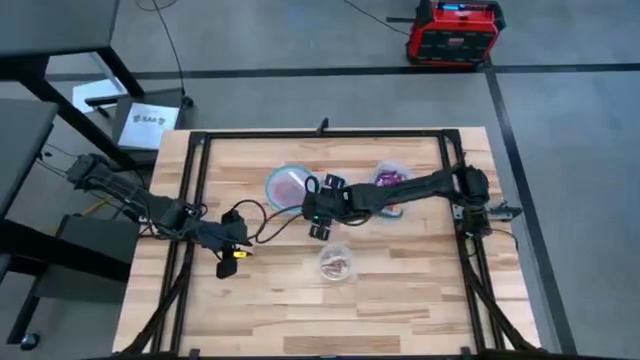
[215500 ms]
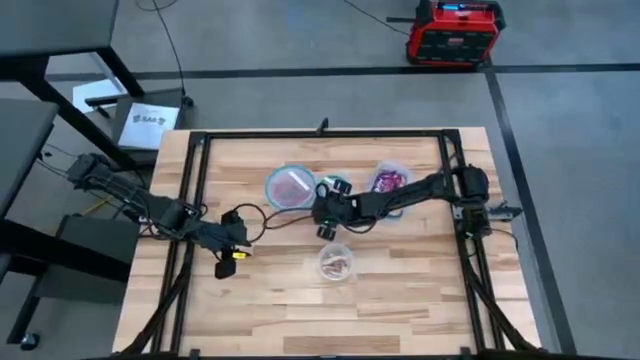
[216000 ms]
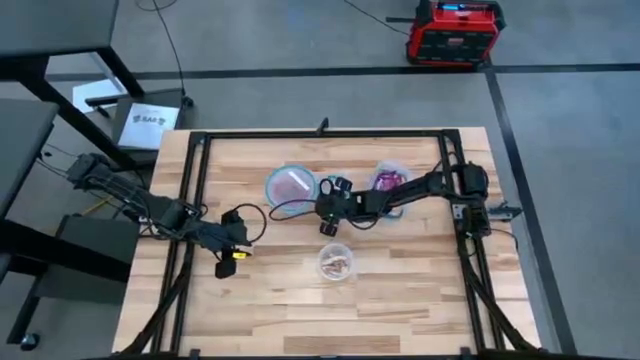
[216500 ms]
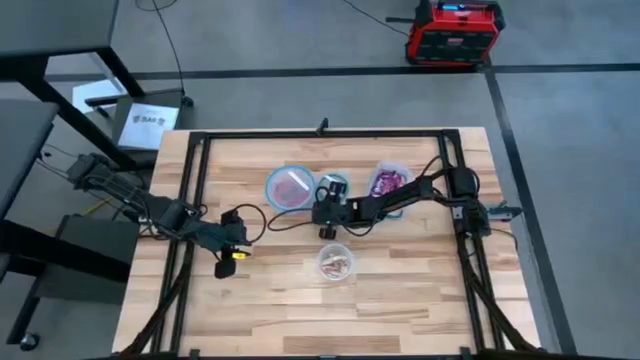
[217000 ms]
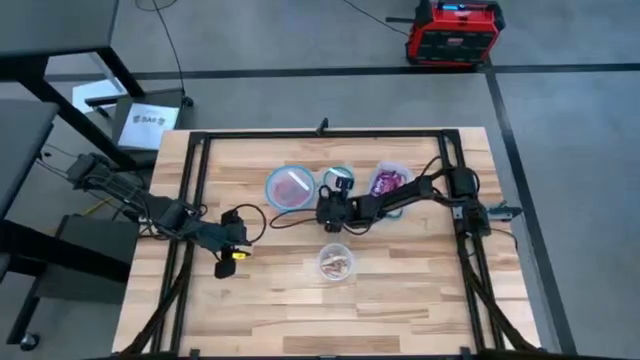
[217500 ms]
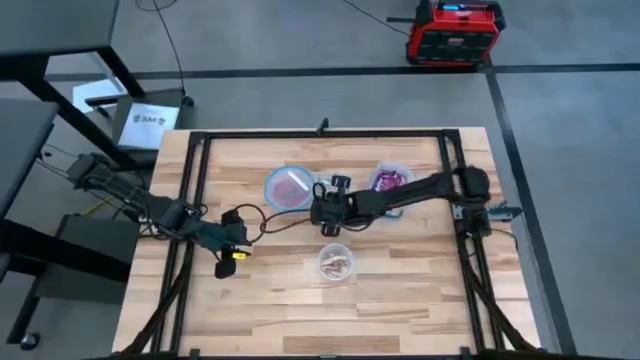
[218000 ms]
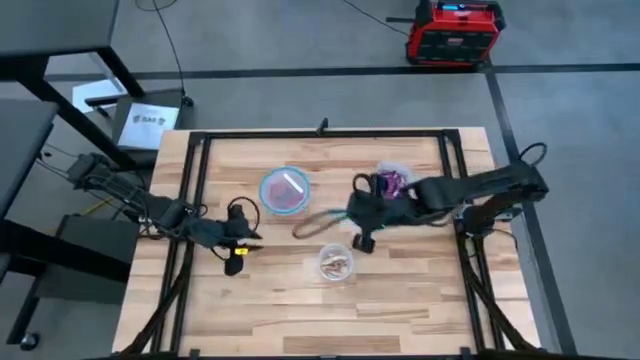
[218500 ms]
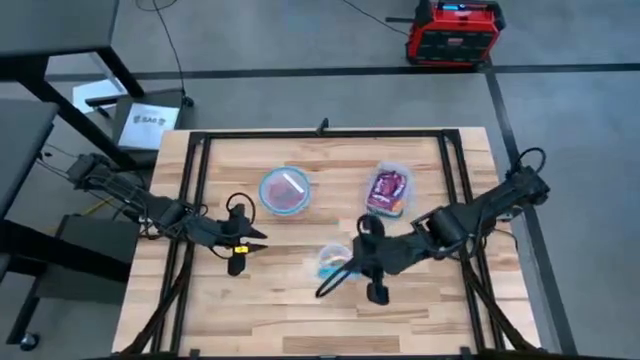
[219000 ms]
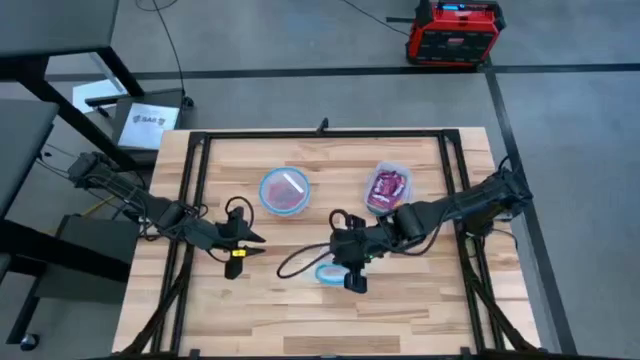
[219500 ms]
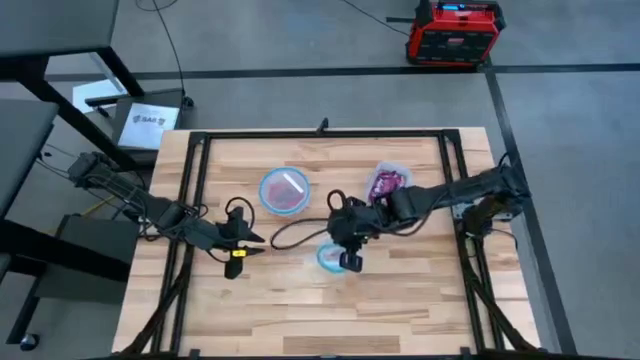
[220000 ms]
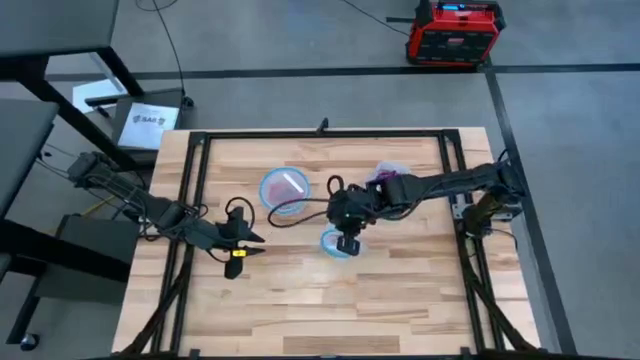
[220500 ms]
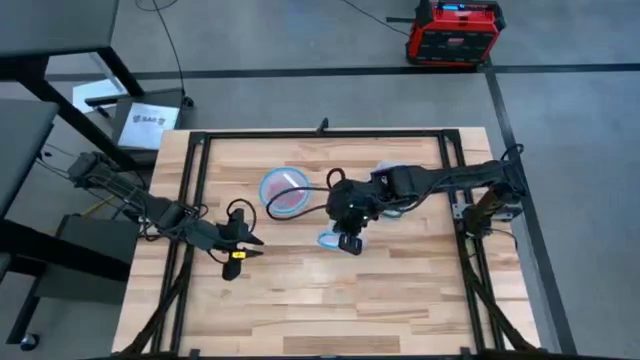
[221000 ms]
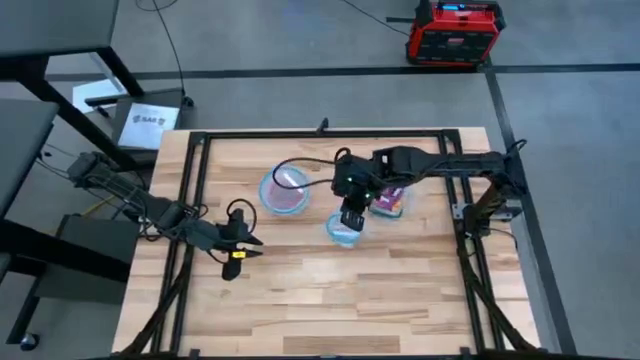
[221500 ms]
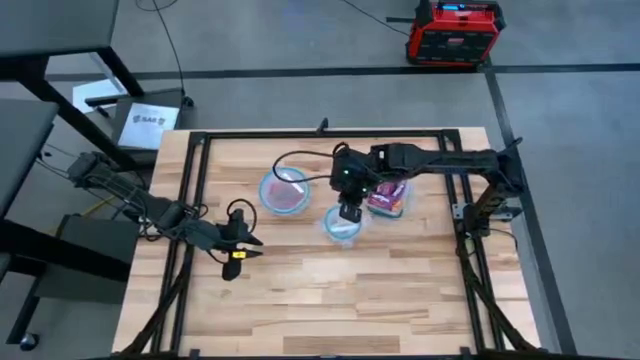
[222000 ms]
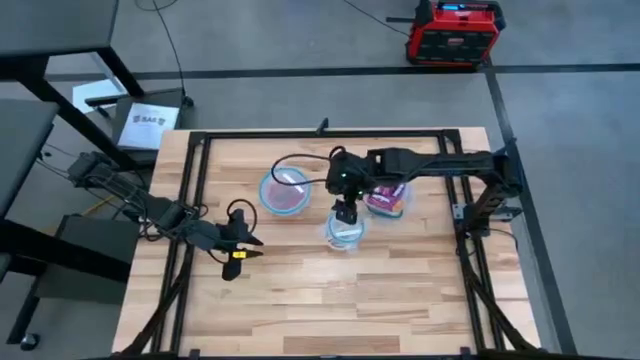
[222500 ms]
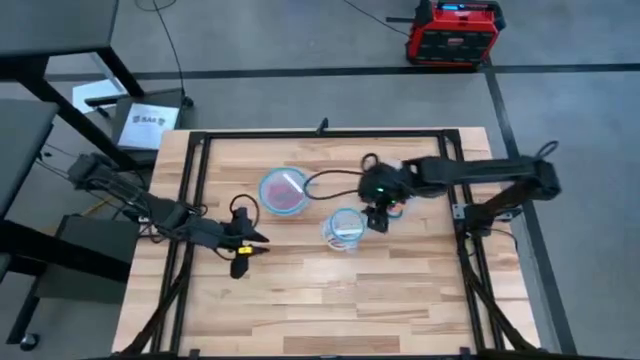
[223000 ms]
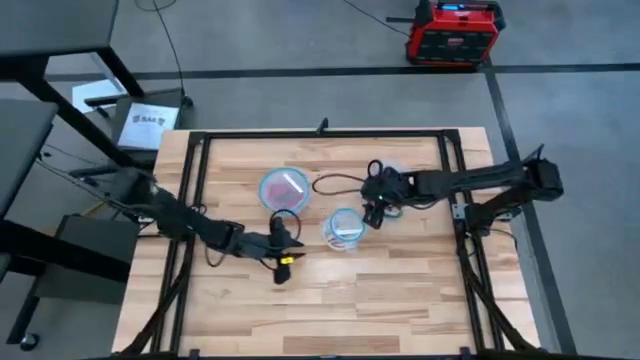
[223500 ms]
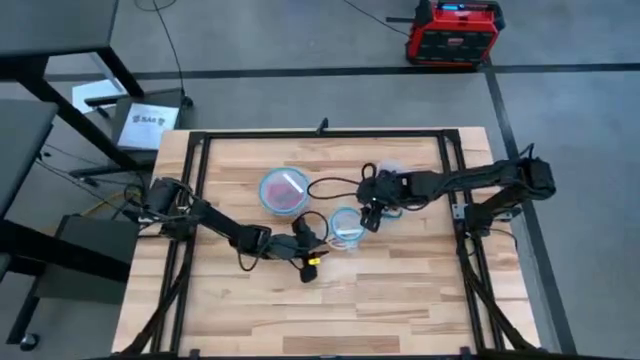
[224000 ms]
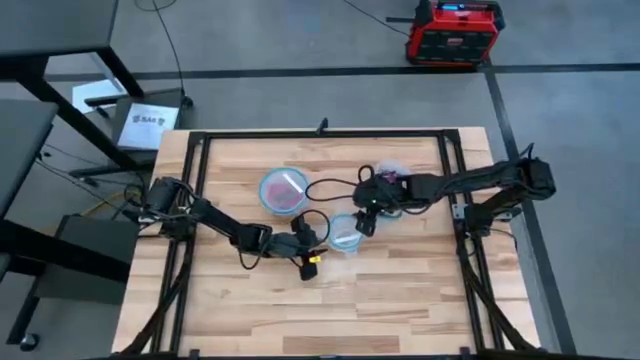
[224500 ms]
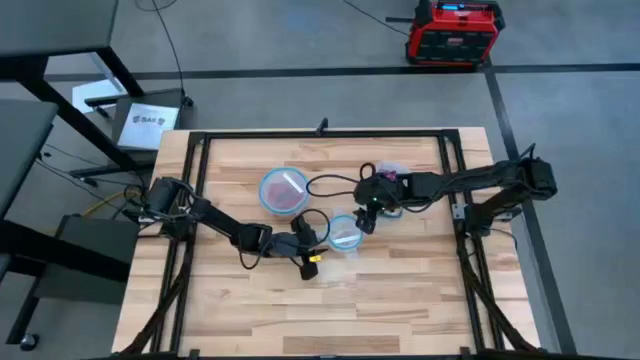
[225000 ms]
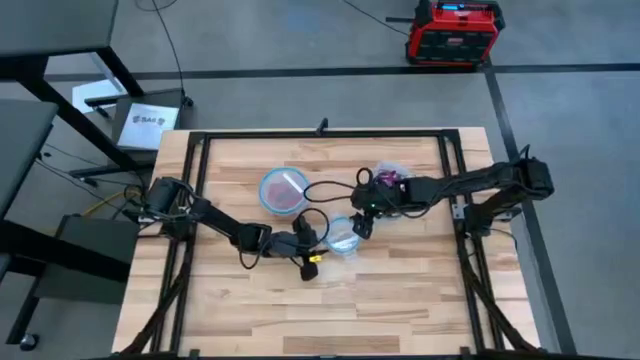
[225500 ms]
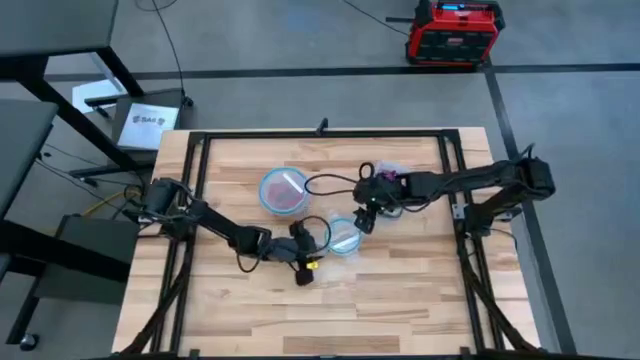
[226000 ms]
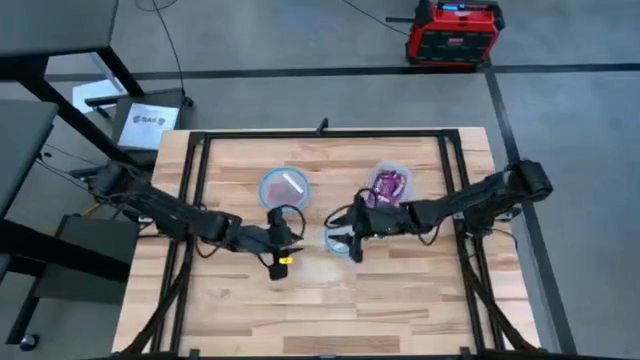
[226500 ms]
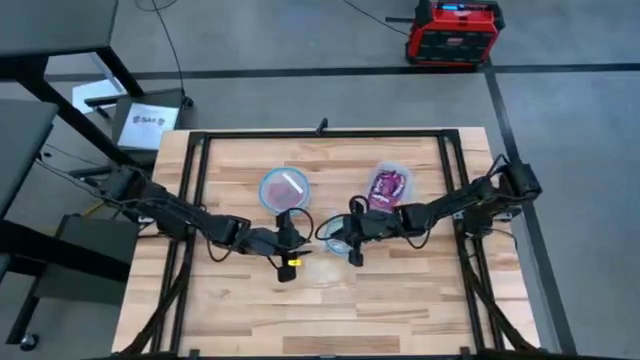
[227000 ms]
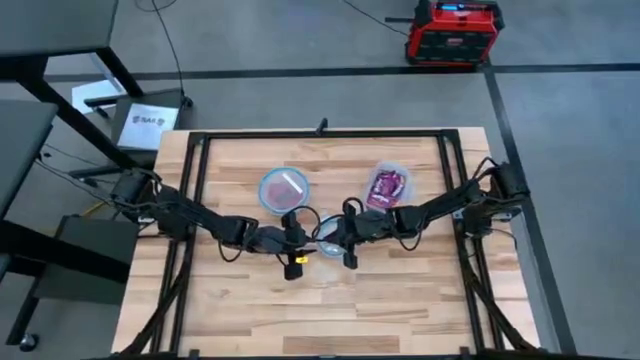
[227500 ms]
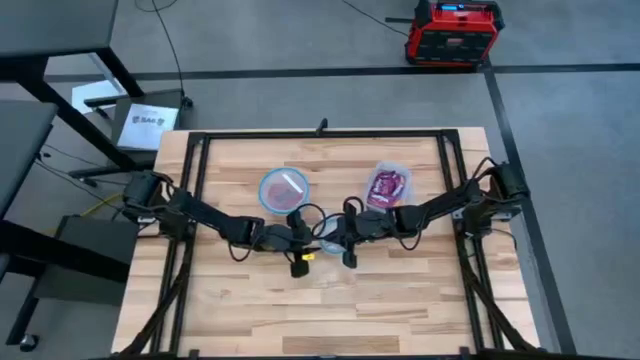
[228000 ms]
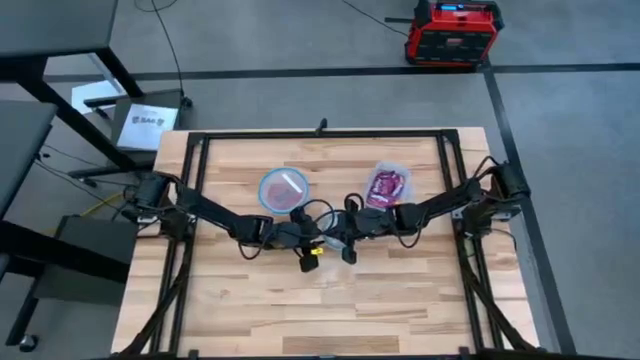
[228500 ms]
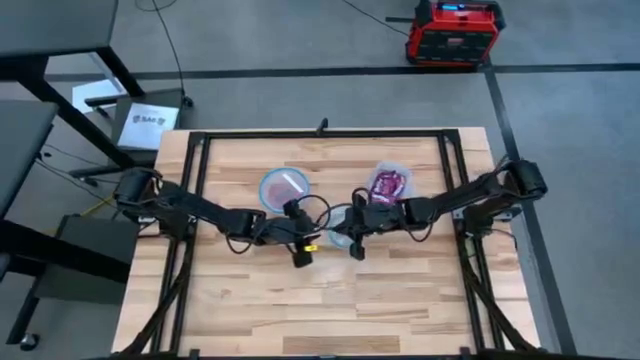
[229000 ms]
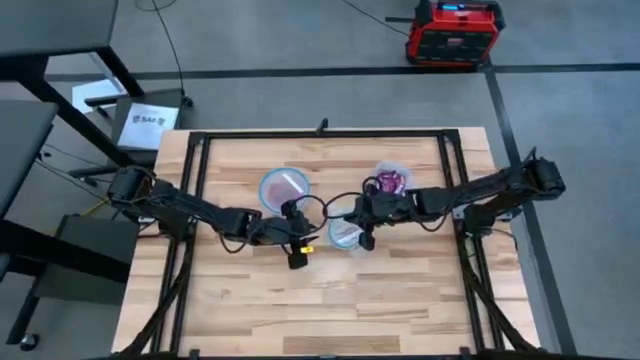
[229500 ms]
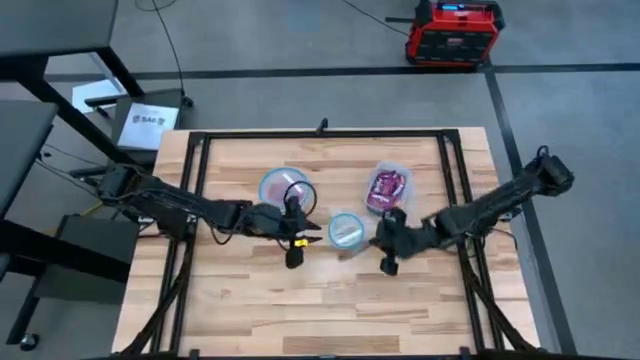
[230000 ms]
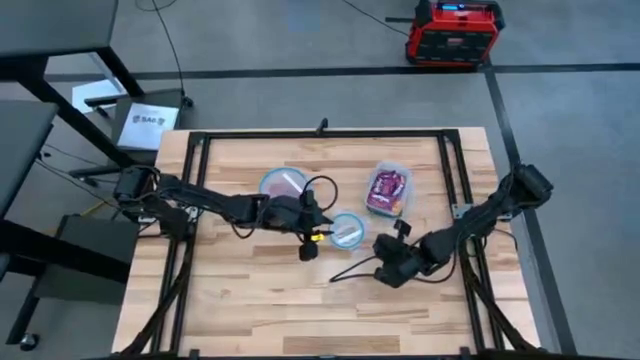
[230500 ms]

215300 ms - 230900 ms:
Task: Sort candy
Close the center transparent bin with the lid

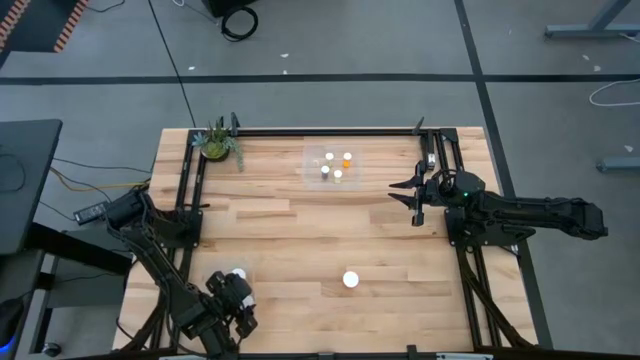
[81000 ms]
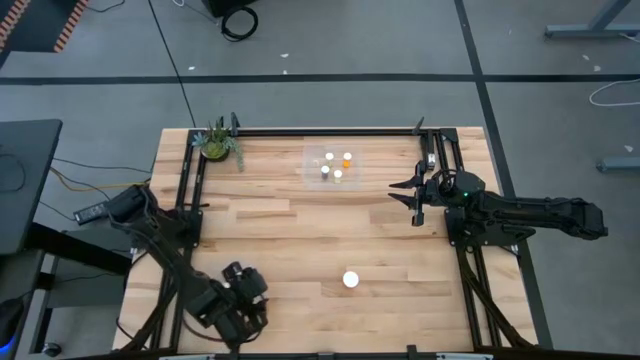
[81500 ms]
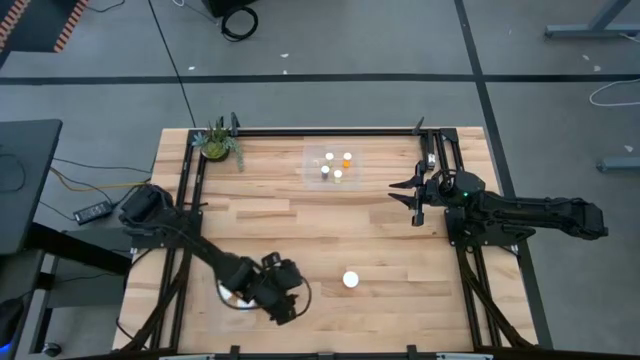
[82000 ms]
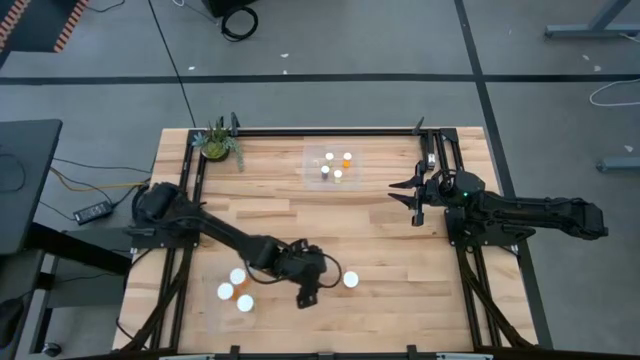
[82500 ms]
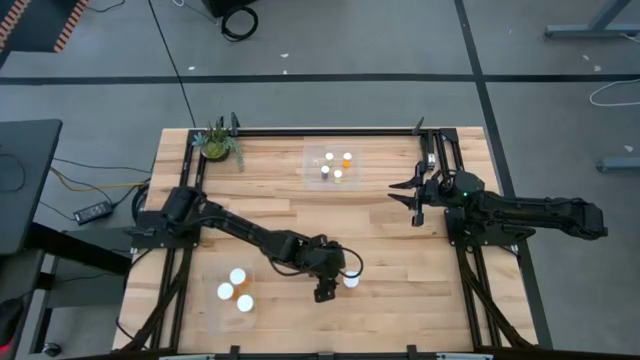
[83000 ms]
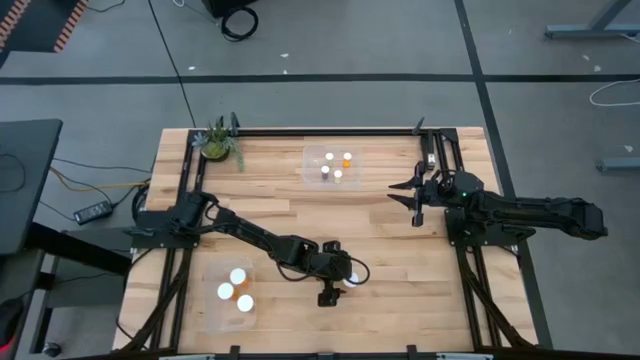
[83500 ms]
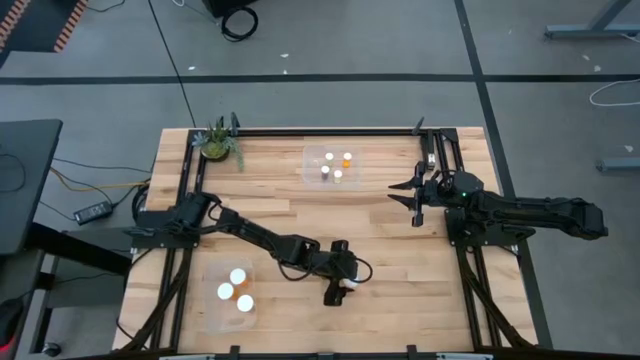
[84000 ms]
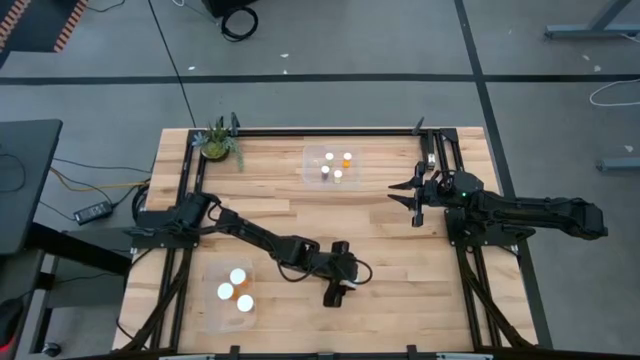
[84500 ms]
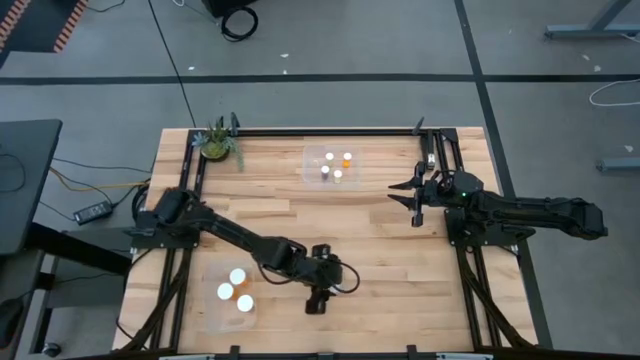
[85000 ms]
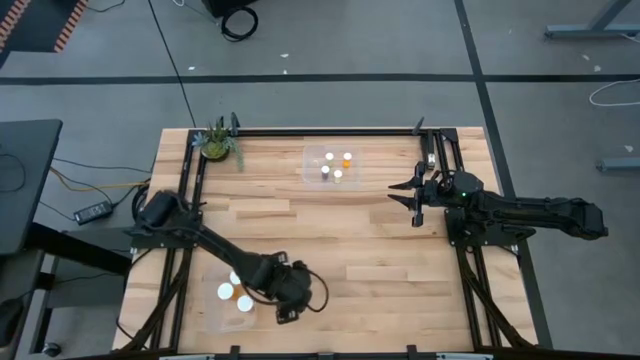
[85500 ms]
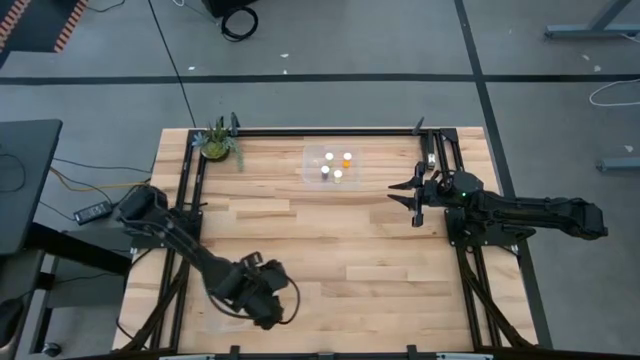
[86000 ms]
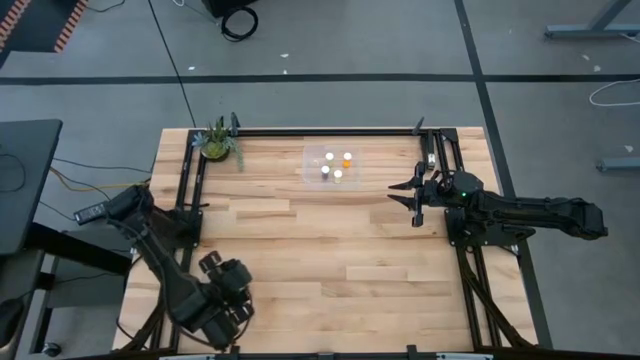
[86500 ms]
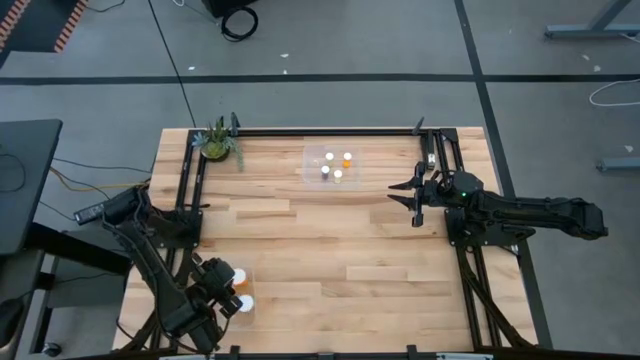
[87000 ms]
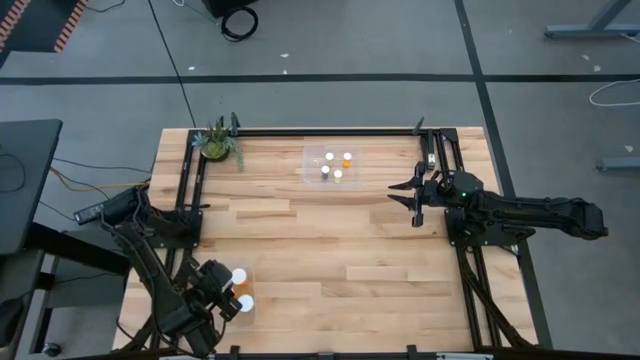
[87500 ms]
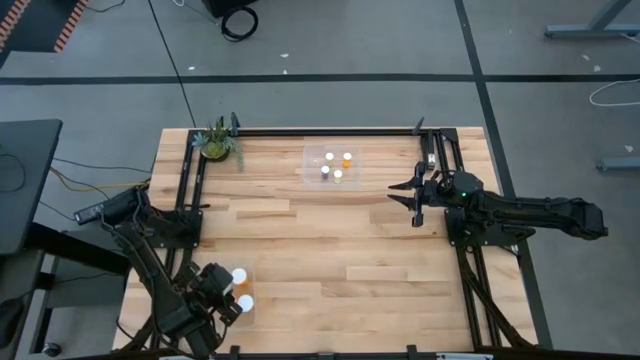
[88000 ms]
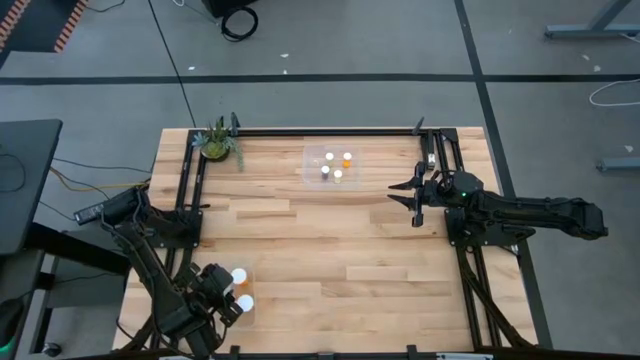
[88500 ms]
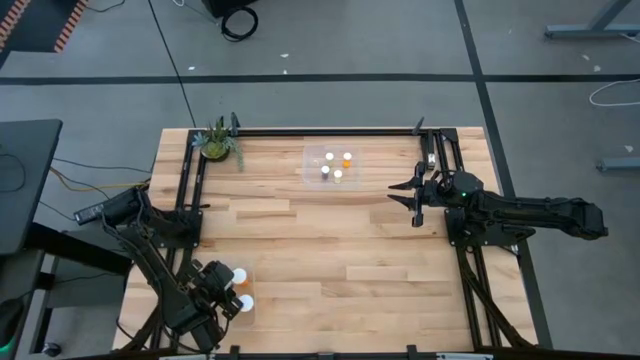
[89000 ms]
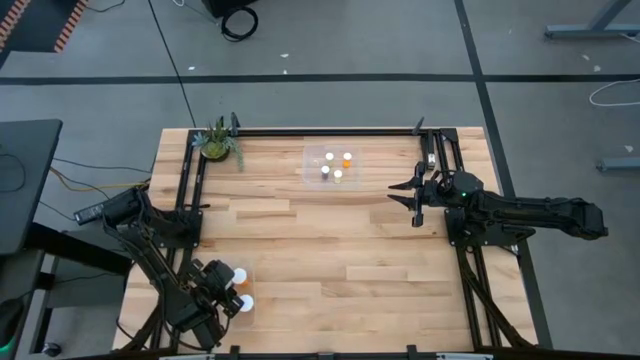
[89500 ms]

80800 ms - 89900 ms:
Task: Pick and place medicine bottles into bin by pill shape (circle, oval)
Put the orange capsule bottle into the bottom transparent bin
